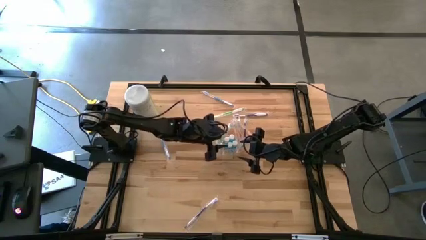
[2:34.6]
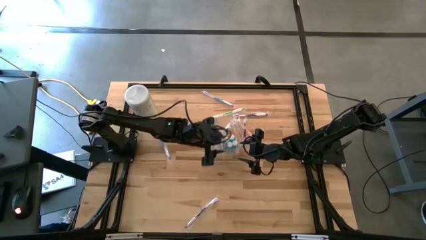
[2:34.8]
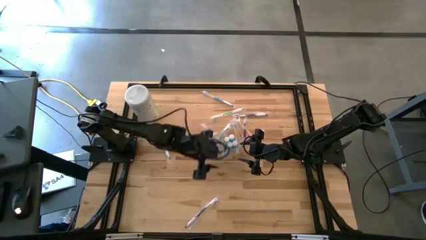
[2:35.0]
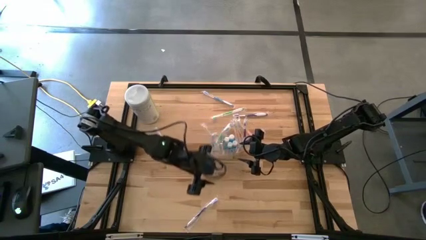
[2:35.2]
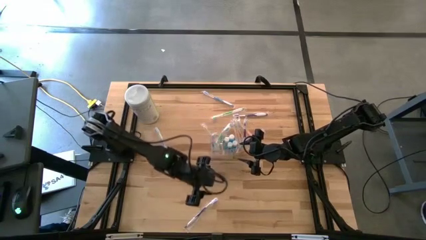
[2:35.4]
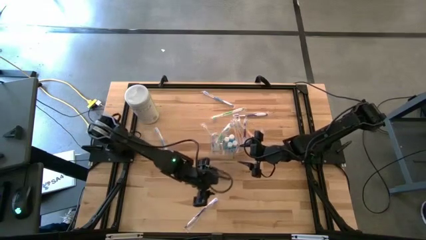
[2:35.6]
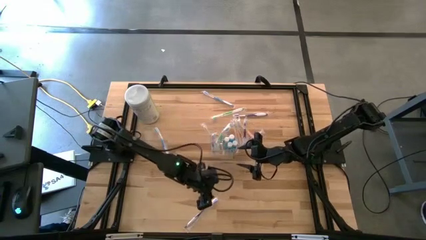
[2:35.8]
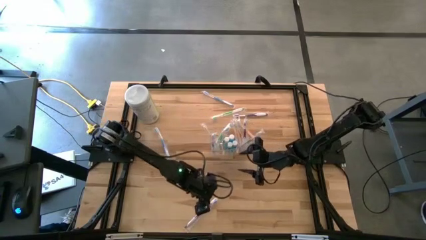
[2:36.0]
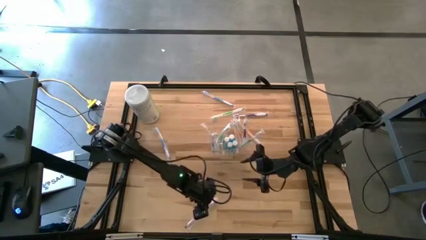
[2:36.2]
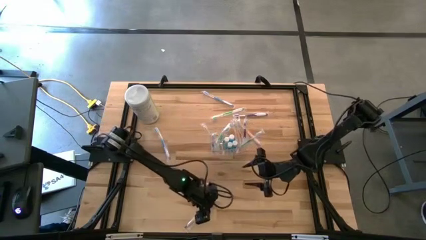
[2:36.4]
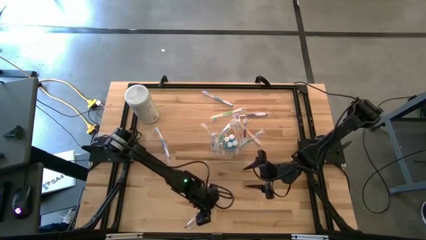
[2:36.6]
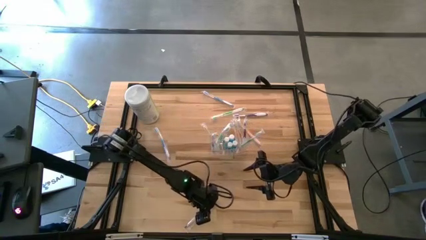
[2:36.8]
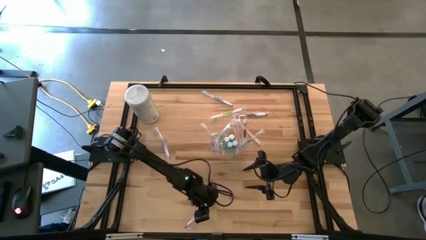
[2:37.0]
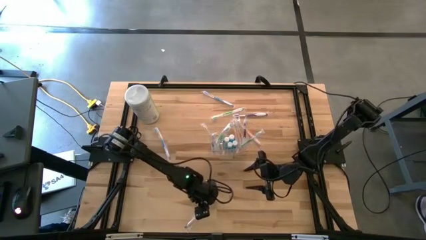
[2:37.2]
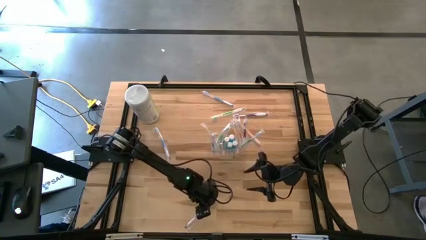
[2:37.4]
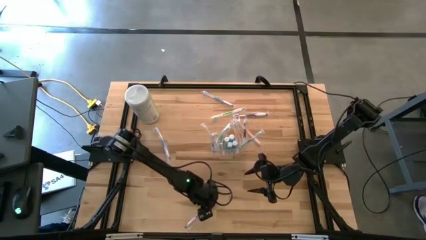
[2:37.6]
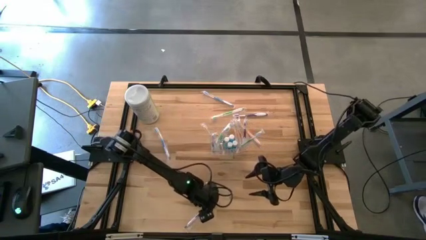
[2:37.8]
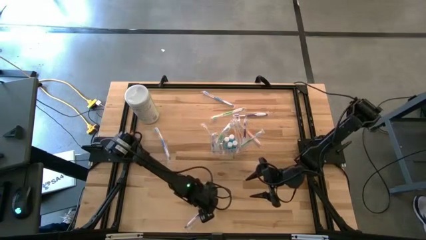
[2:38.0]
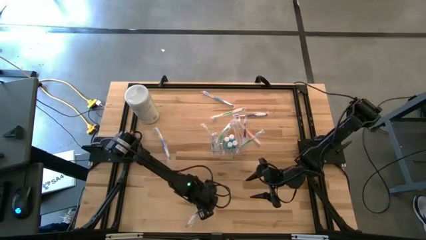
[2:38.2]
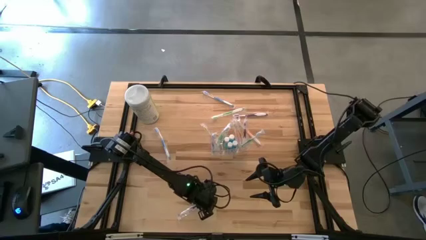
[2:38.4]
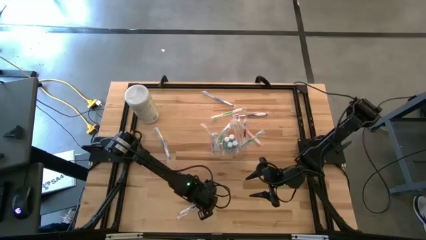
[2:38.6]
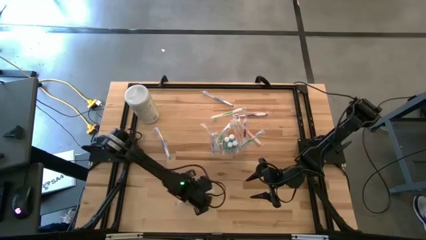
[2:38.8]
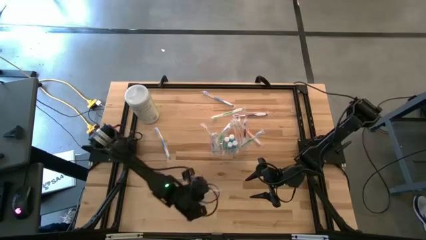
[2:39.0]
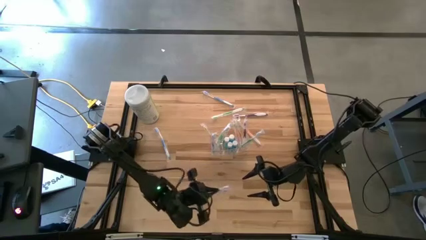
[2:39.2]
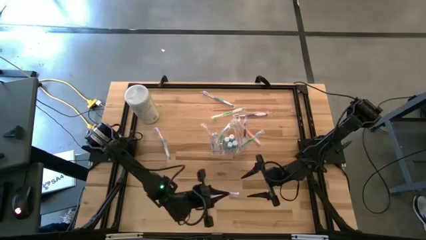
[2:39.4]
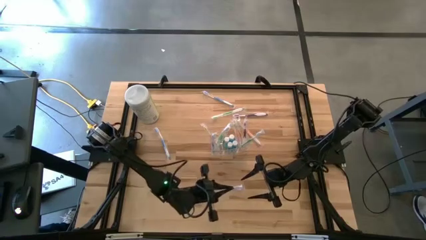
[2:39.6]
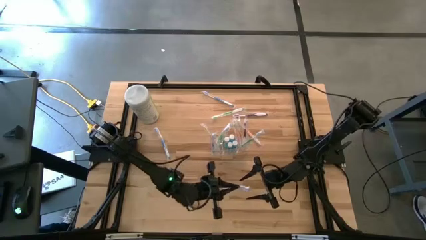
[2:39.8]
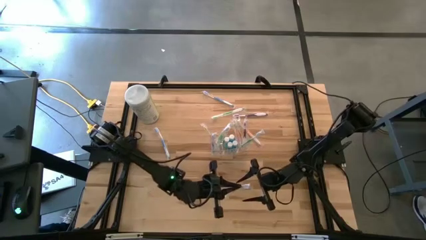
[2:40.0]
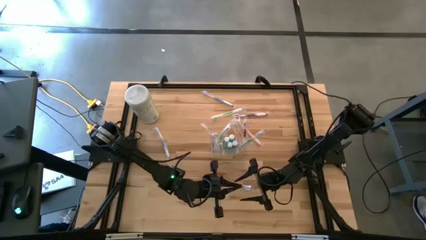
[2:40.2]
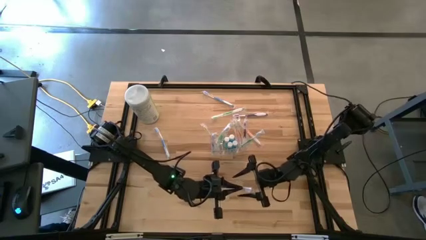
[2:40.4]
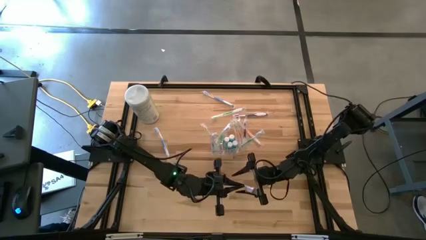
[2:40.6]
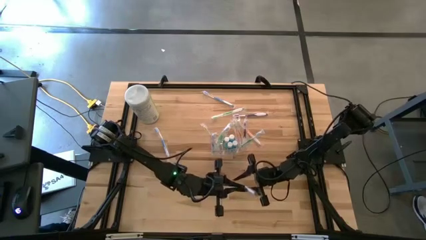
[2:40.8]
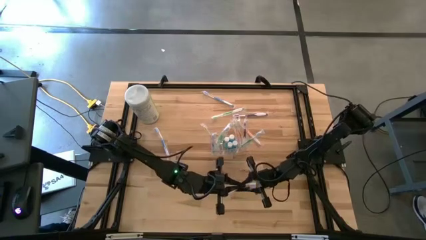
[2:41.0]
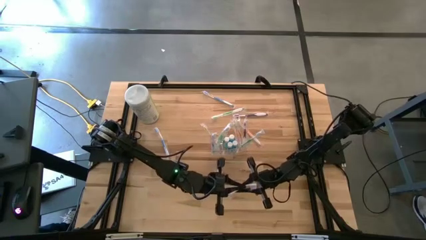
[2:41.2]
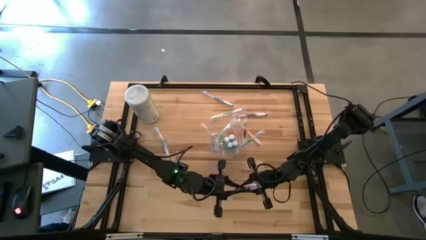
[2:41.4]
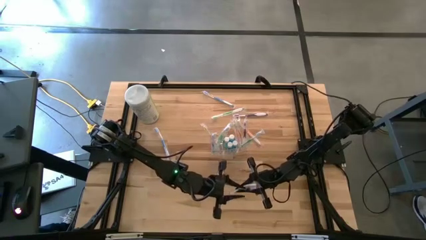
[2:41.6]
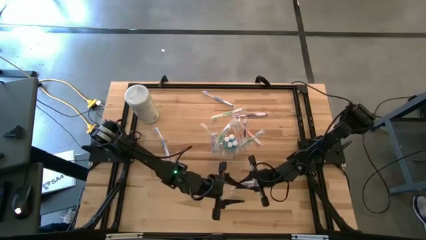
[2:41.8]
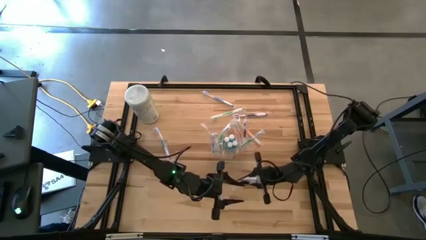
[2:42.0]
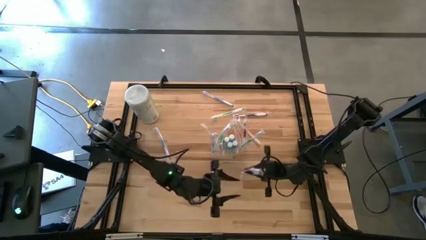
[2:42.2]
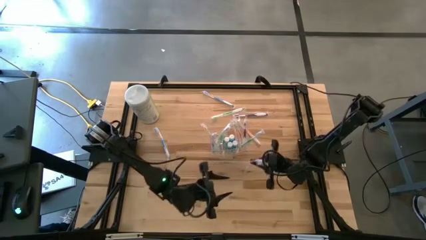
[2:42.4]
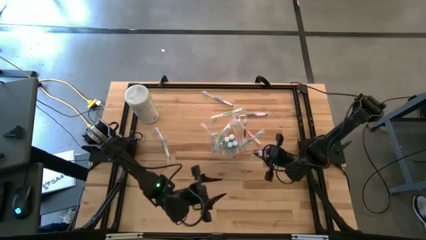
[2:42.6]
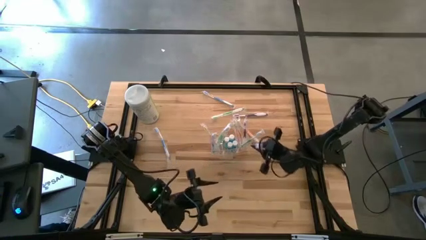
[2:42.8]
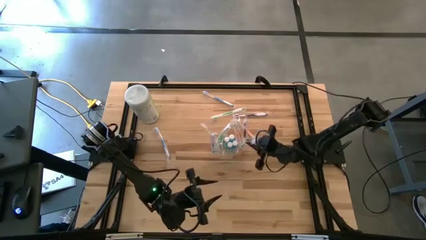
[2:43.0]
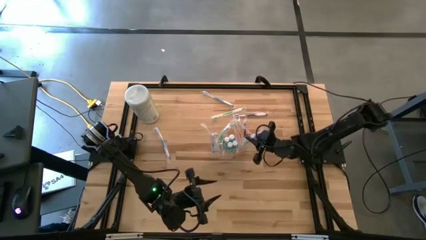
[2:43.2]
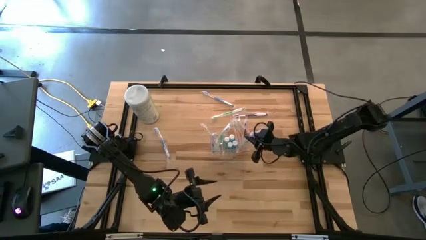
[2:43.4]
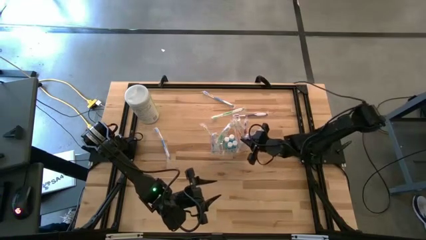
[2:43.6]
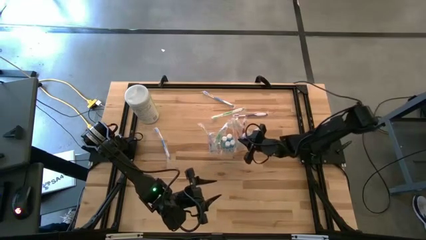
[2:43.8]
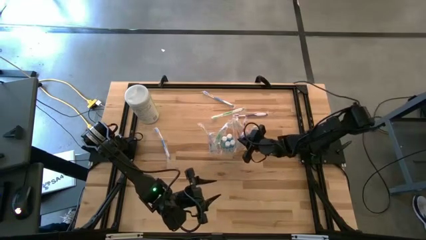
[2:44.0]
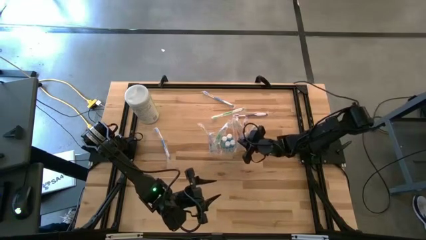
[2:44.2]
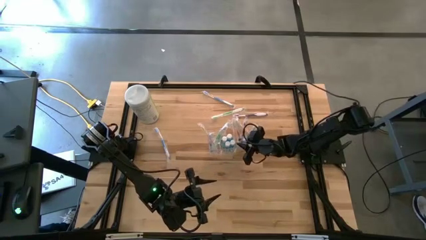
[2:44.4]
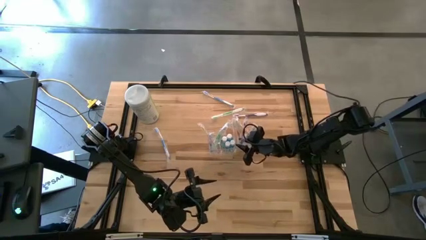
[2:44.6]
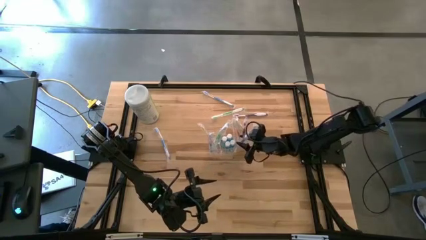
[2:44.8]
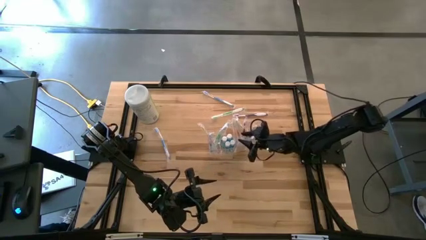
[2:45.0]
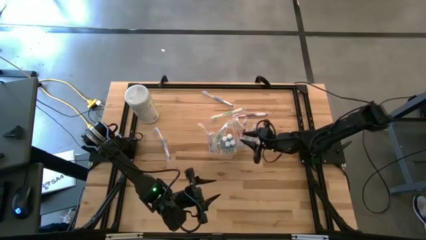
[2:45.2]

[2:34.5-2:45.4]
Task: Pick & Place toothbrushing station
Put the violet toothbrush into the transparent organizer

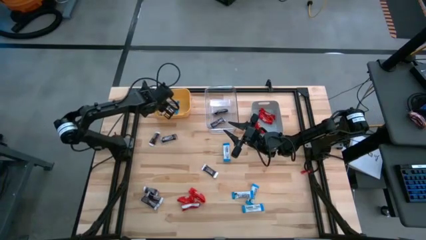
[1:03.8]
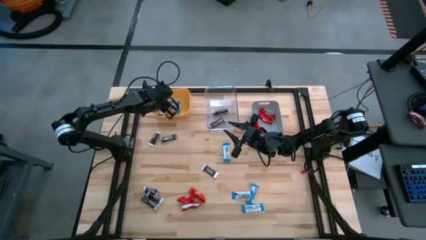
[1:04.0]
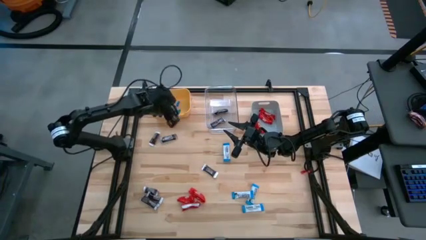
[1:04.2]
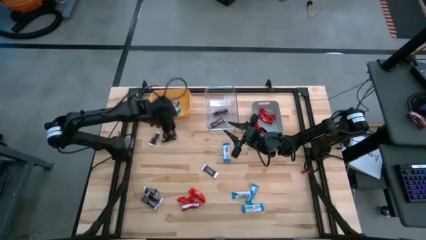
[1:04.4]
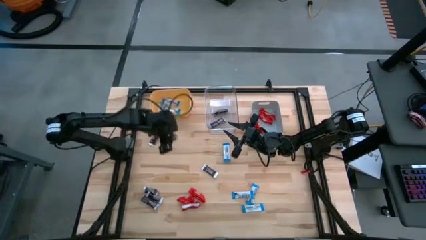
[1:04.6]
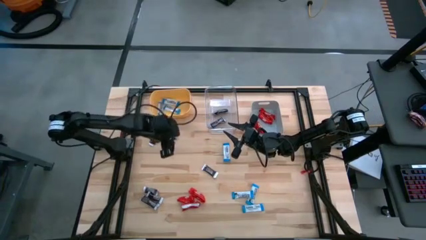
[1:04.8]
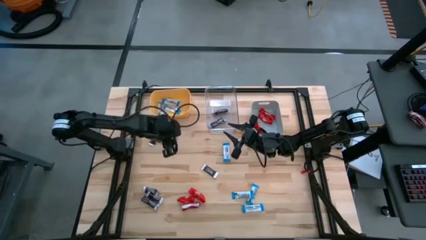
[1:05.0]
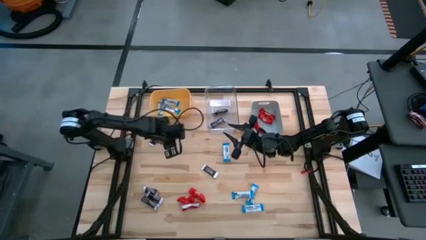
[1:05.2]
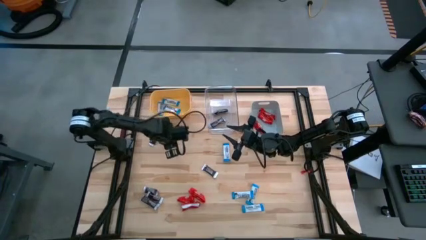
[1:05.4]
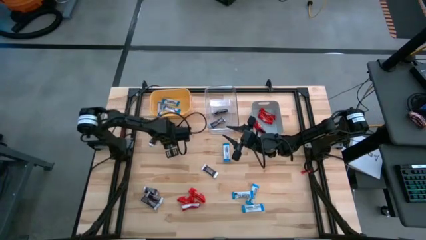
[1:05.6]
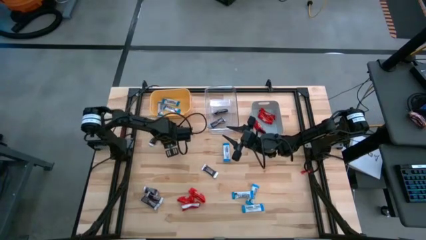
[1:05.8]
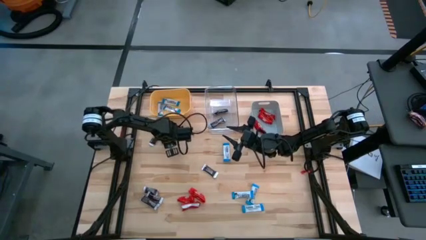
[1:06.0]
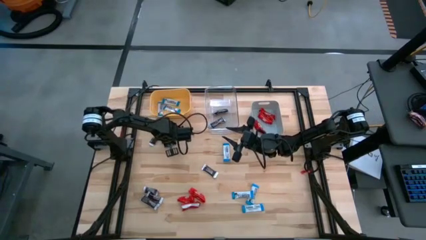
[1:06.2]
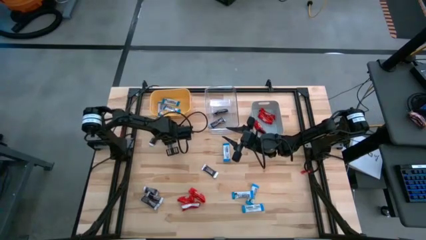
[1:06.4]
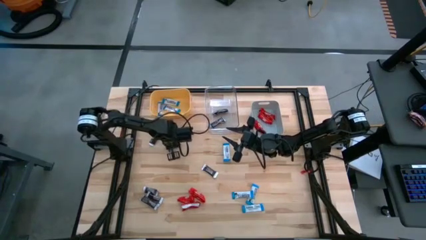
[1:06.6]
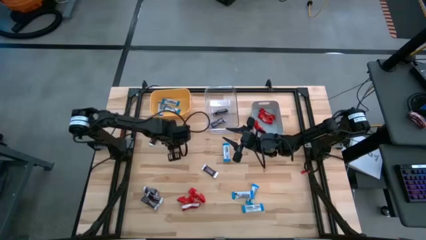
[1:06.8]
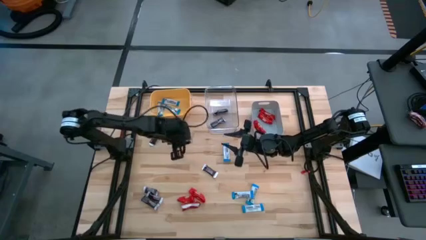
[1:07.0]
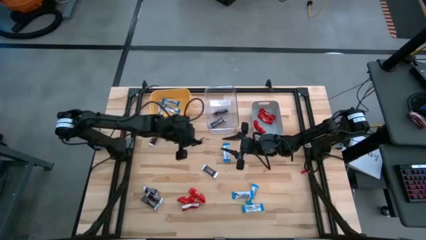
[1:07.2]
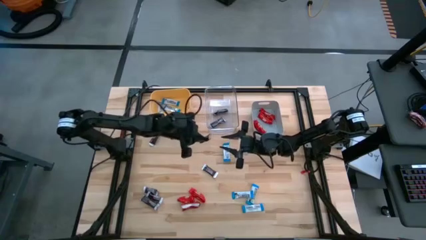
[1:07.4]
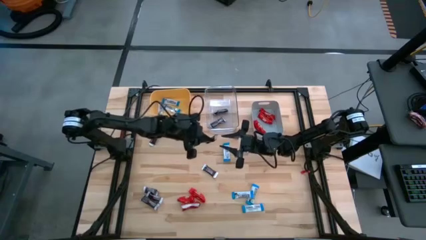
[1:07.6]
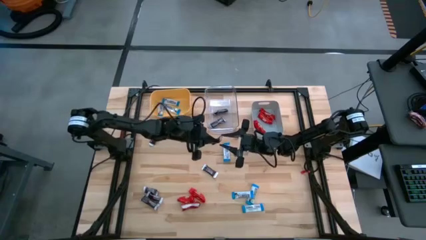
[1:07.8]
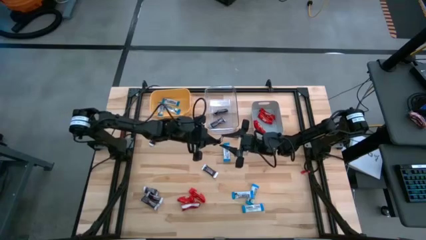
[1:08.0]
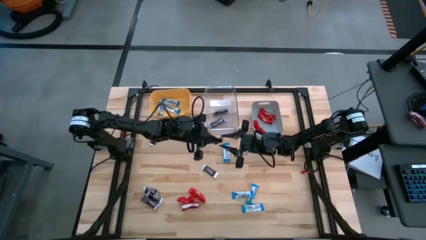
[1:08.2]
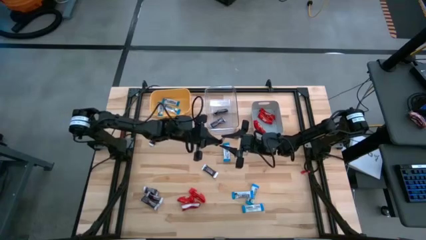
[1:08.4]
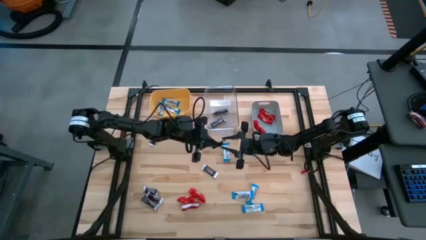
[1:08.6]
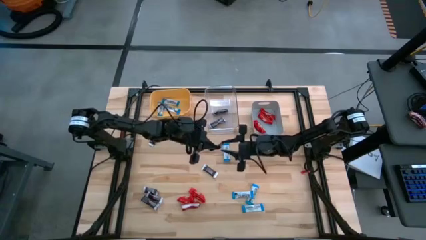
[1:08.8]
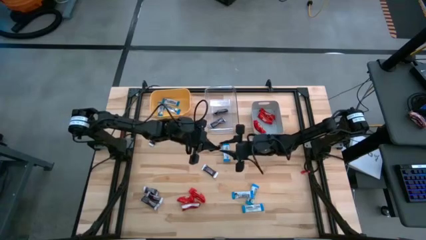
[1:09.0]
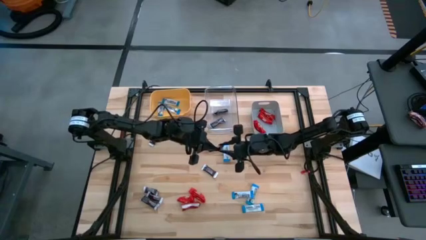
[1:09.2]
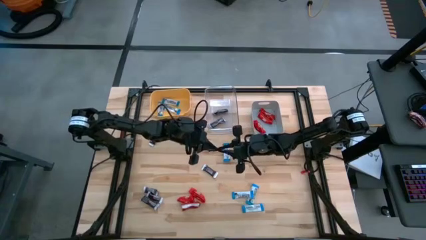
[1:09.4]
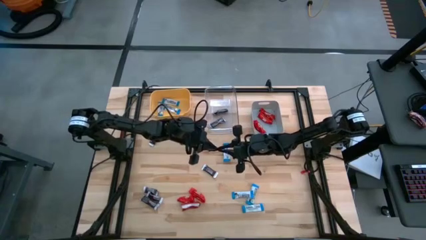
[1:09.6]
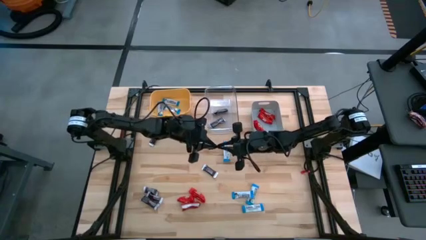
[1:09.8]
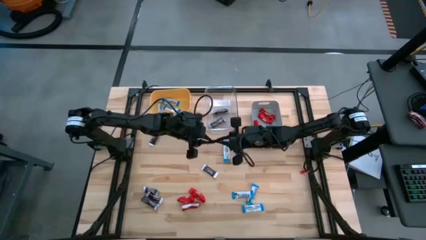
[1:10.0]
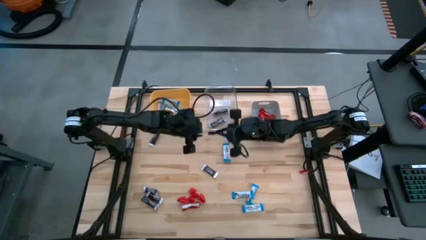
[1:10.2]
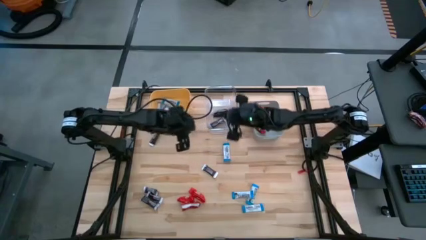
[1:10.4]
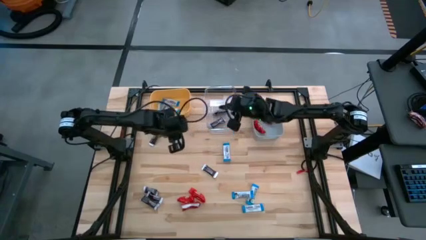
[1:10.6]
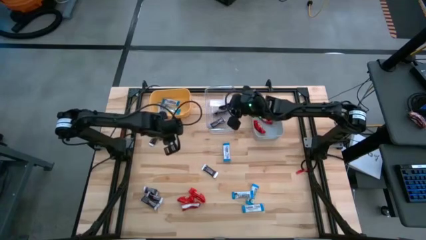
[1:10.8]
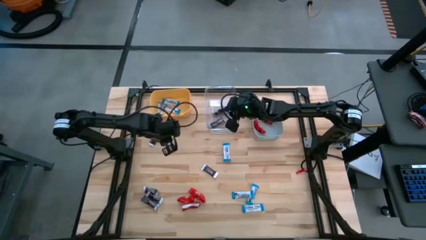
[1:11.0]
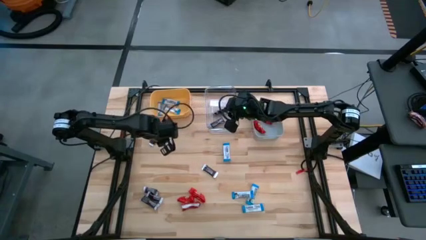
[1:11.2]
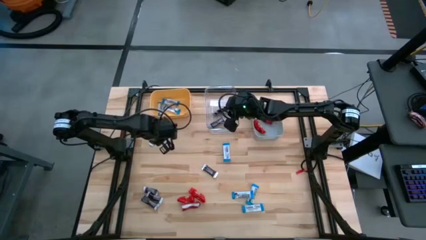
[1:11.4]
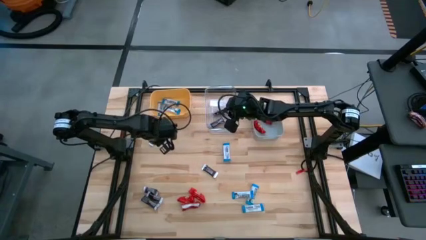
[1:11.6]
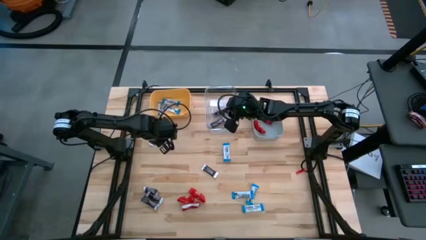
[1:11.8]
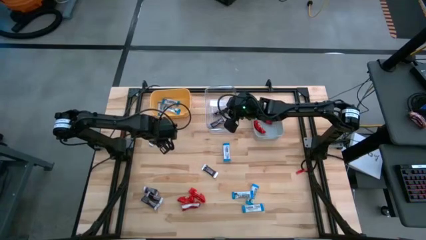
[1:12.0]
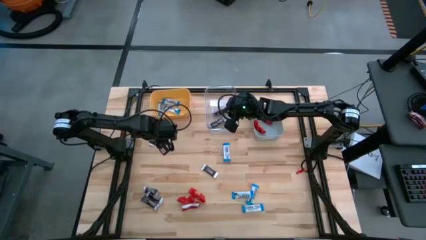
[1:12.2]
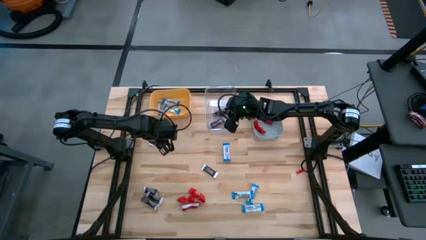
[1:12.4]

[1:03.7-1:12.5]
Task: Sort candy
Put the brown chocolate into the transparent bin
